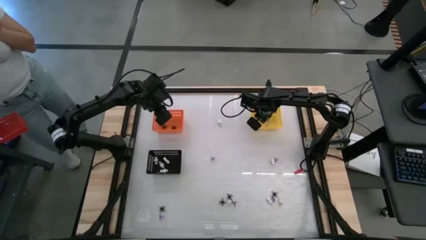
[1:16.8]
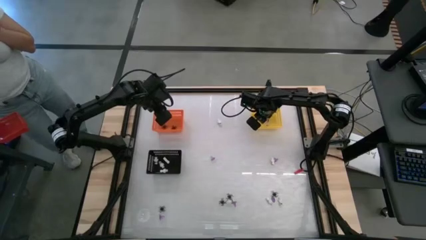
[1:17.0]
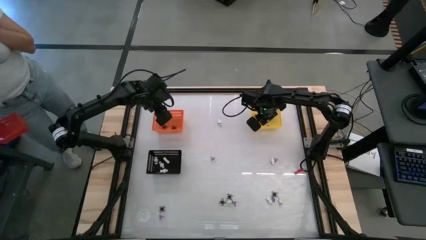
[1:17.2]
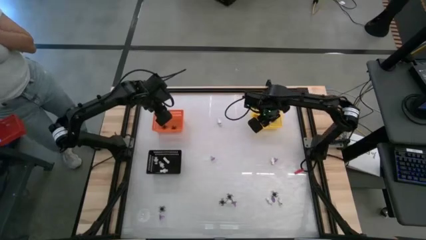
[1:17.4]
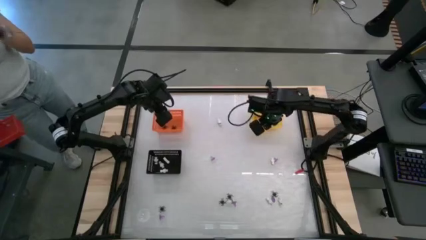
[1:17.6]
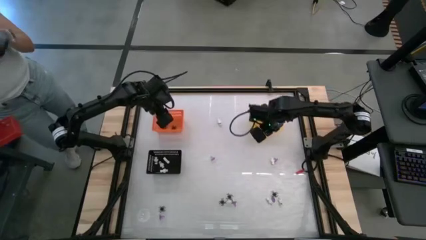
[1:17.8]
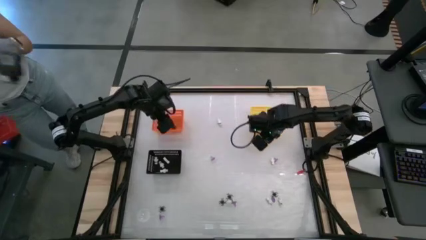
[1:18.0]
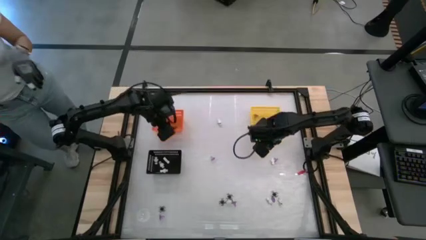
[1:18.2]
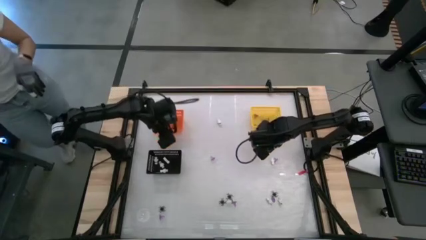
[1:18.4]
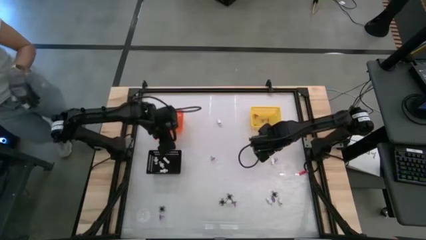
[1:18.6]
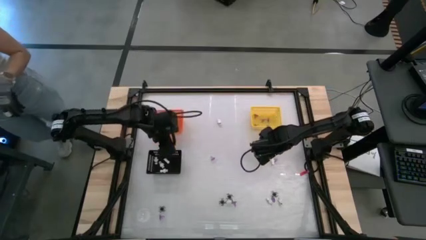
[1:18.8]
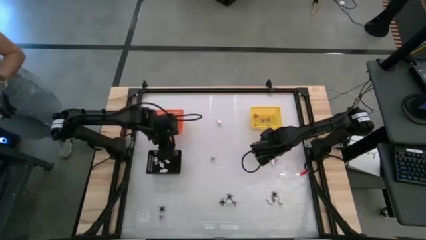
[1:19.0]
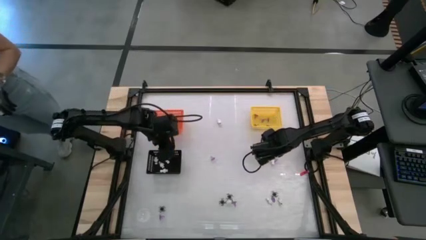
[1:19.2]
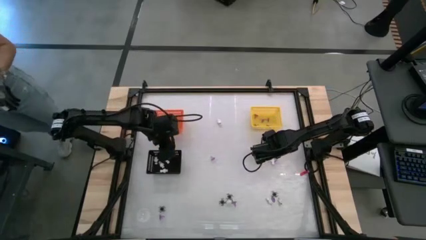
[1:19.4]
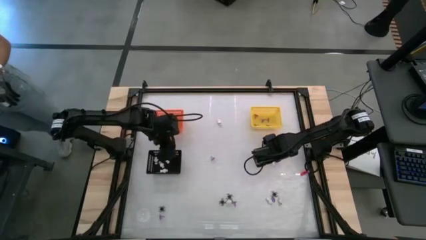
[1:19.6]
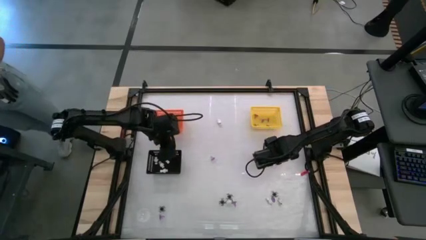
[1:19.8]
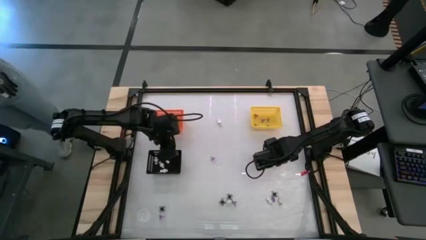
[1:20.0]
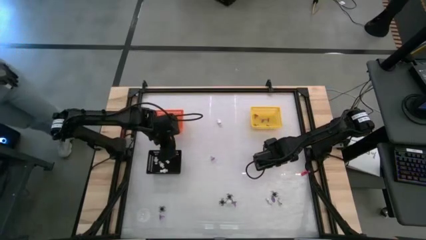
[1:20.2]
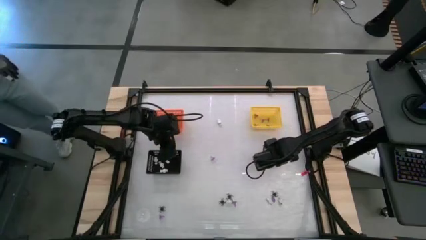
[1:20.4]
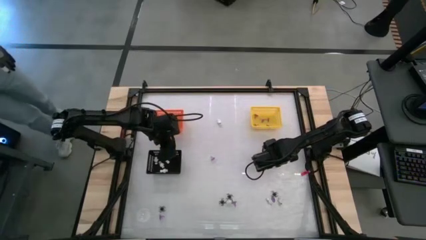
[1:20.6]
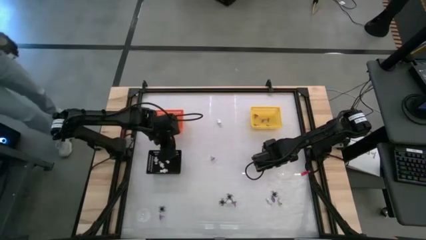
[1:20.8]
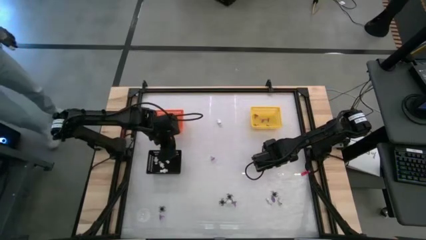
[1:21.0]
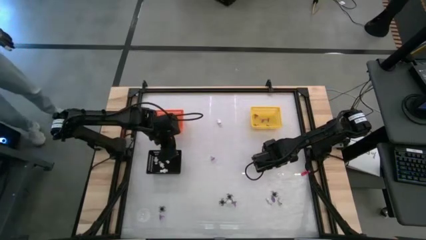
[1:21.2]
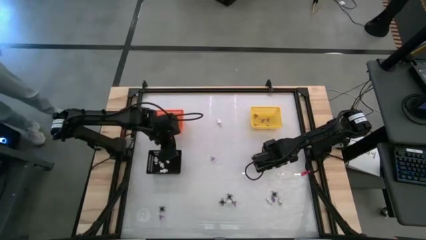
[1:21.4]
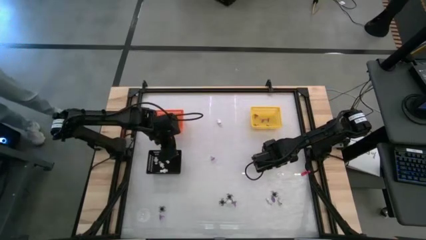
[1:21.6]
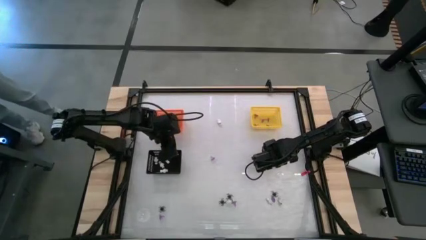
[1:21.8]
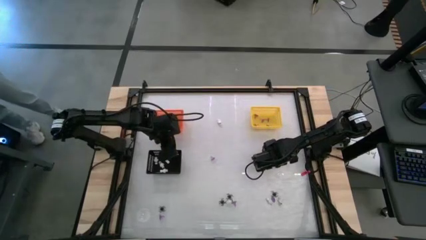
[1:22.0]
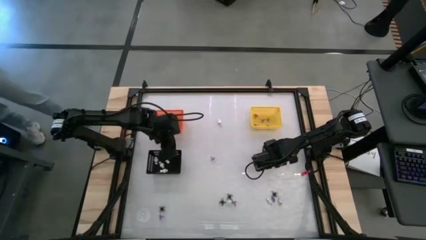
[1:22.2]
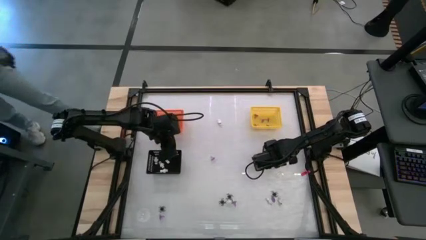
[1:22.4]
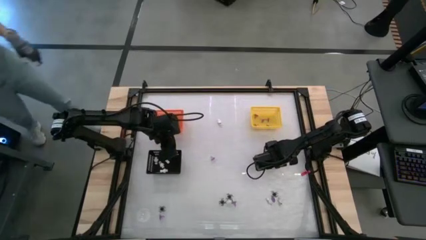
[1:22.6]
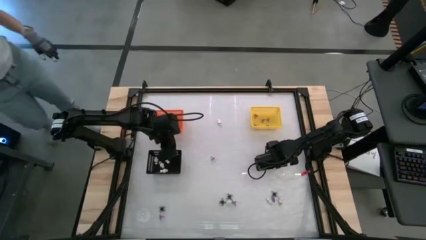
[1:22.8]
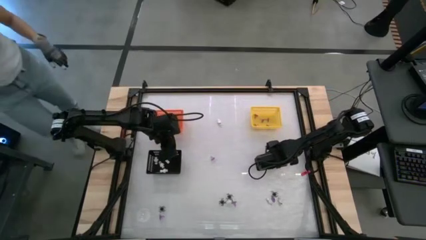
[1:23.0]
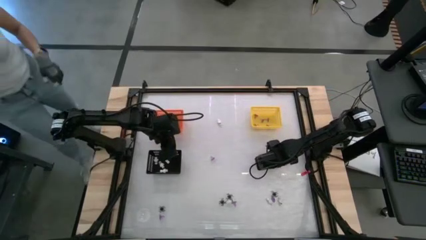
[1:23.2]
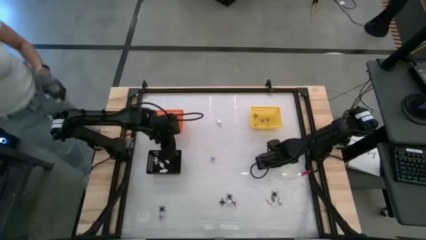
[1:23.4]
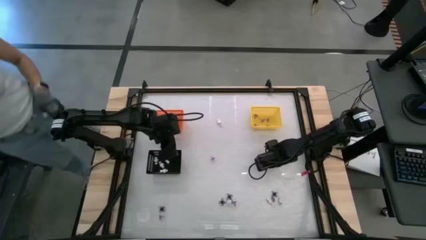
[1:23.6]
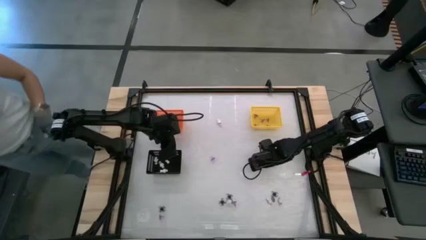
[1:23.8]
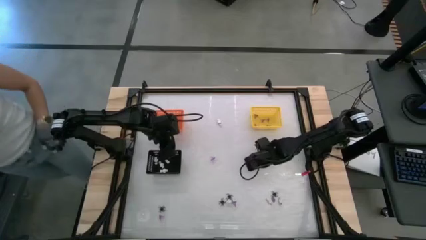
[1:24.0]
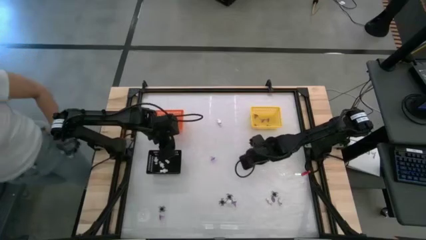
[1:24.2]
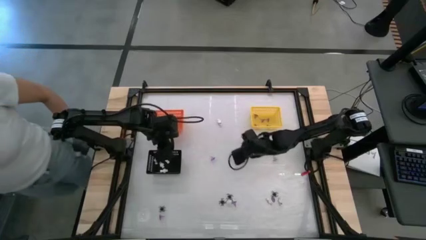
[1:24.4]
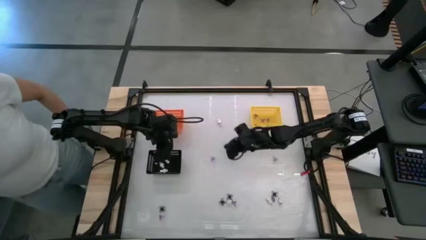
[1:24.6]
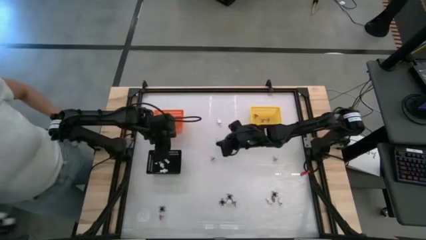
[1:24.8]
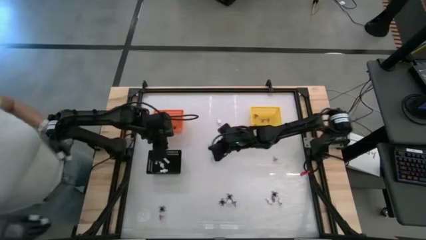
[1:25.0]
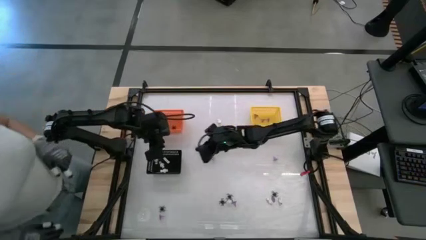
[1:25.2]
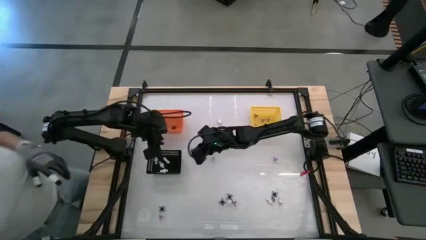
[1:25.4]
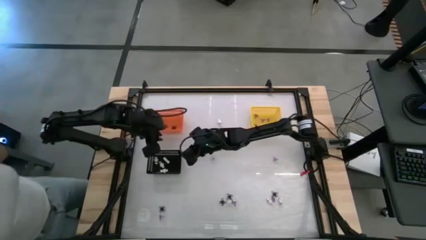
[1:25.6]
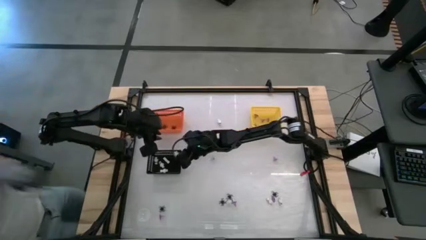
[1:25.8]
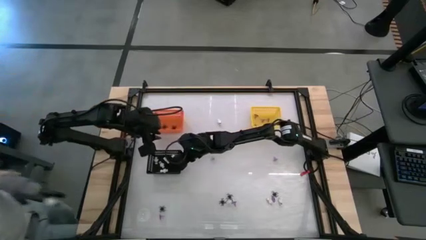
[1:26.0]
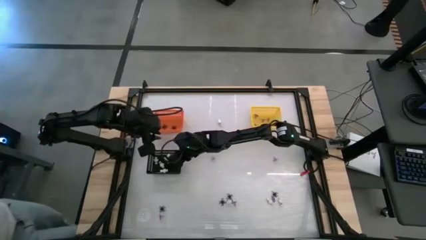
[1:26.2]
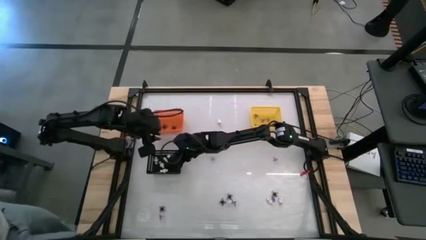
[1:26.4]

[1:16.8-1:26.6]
Task: Sort Halloween decoration
Put the white skeleton toy into the black bin

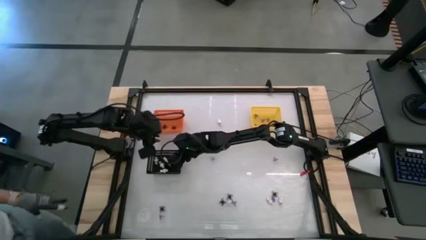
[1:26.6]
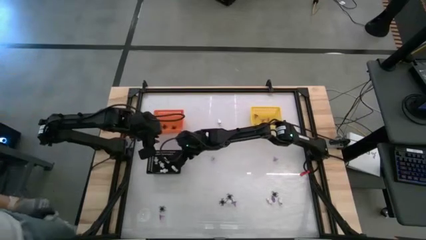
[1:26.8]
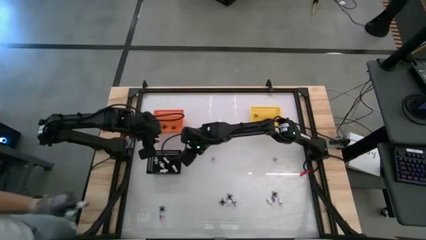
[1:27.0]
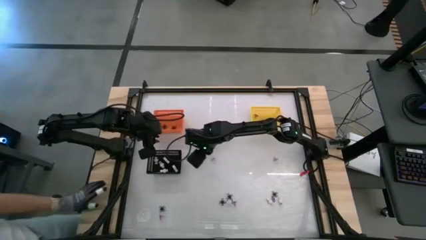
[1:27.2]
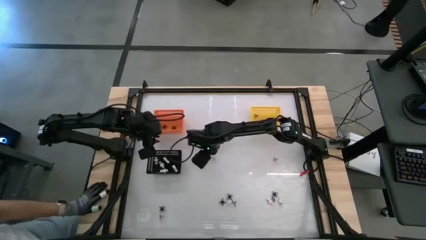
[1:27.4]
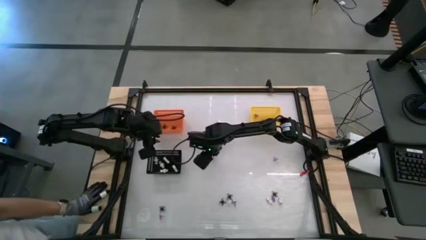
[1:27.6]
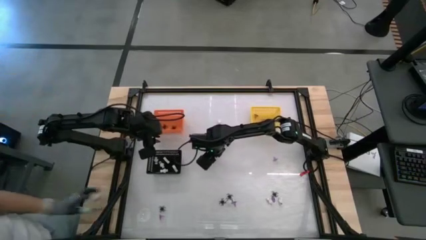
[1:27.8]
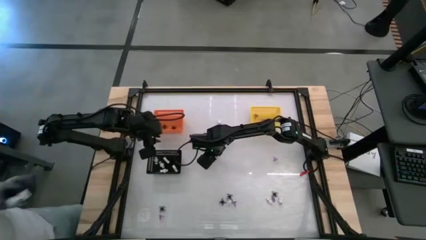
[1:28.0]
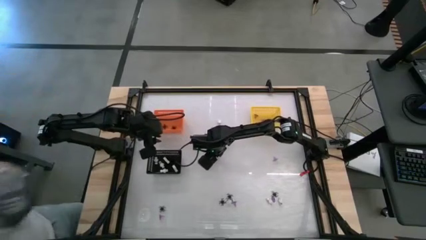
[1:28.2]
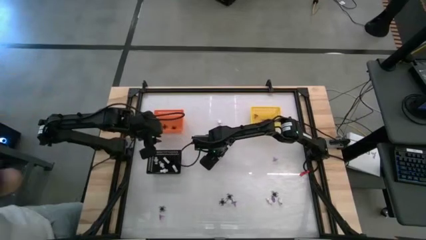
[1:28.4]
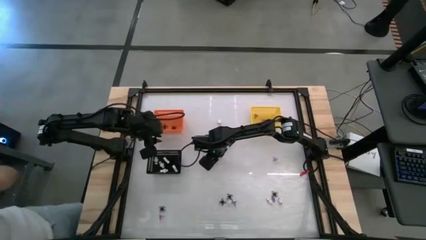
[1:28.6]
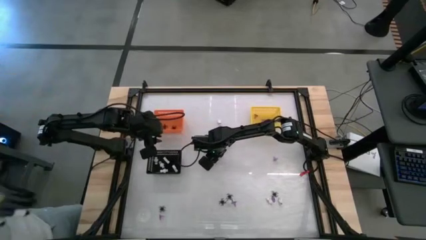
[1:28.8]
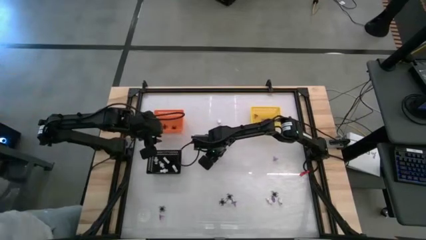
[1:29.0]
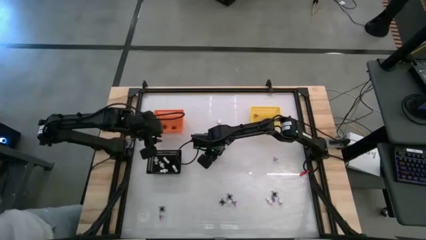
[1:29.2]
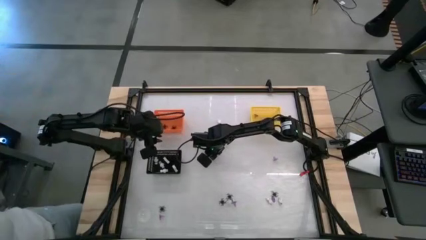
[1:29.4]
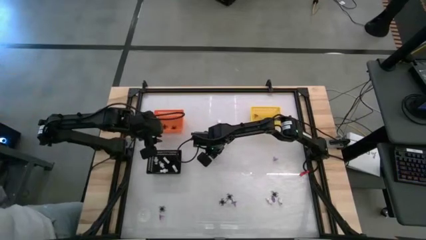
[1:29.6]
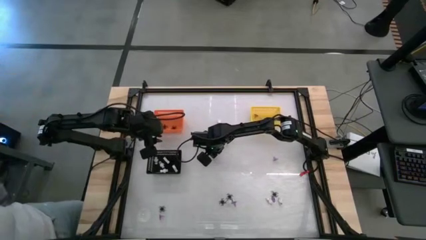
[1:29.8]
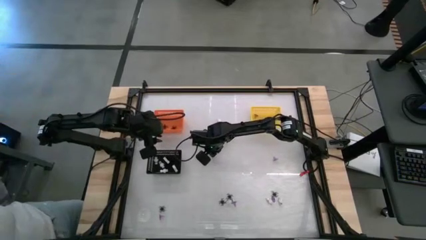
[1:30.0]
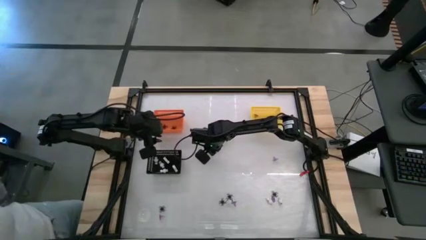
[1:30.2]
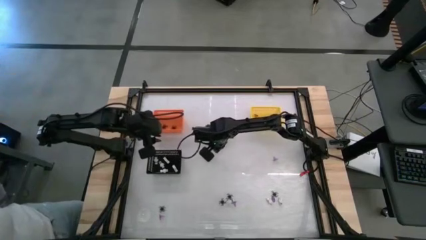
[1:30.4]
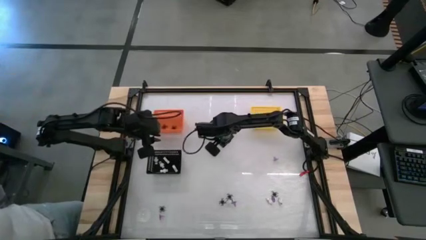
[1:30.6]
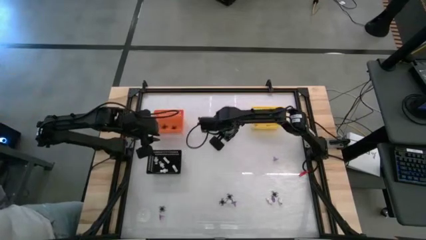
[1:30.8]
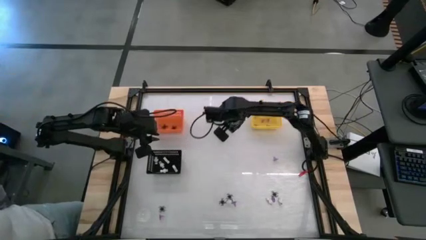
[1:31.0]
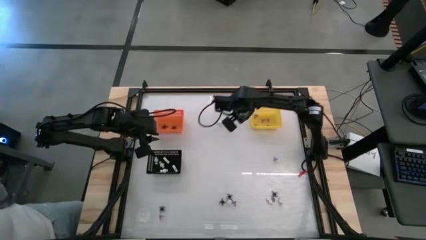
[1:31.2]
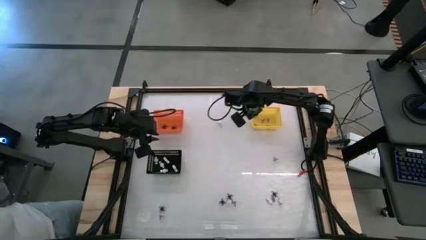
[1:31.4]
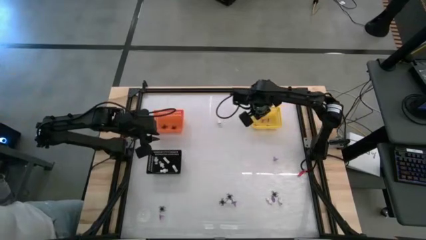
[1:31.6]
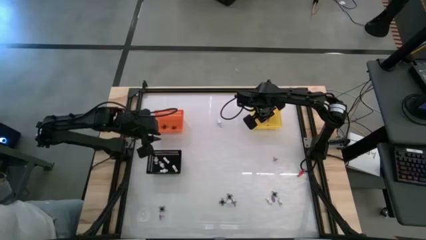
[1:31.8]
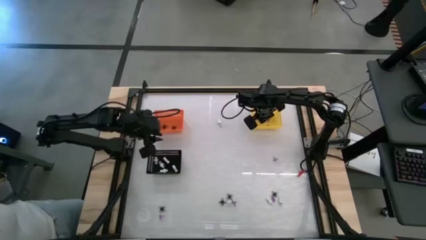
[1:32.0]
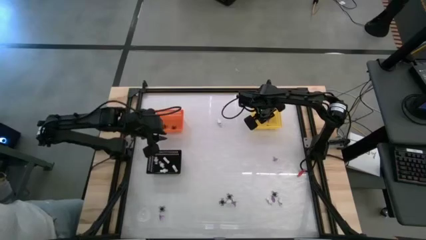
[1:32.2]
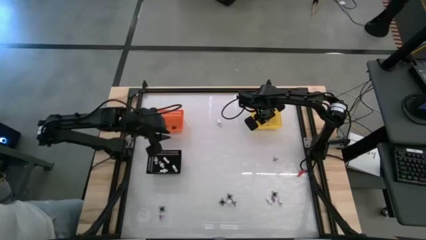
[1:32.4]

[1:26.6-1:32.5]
Put the violet witch hat into the yellow bin

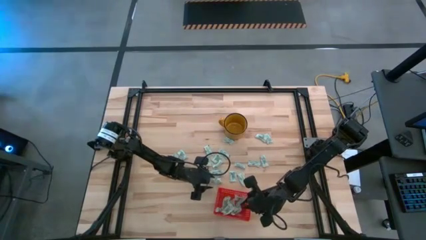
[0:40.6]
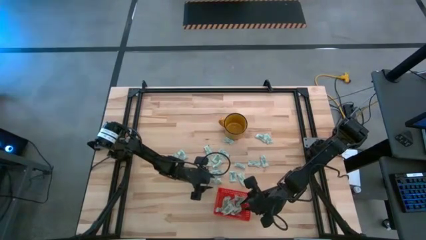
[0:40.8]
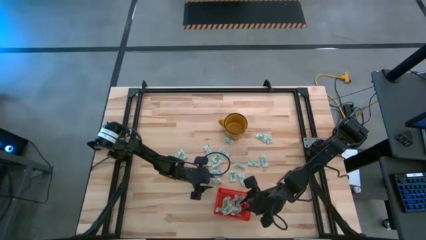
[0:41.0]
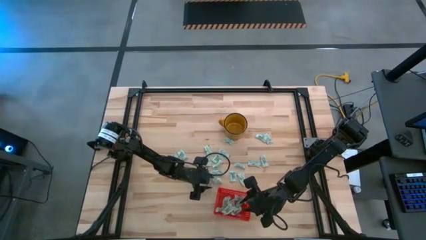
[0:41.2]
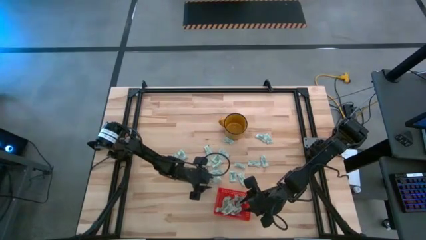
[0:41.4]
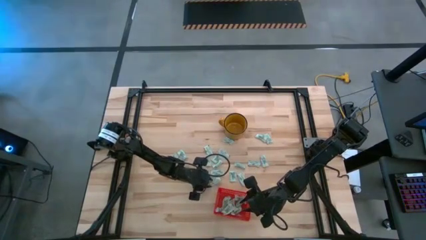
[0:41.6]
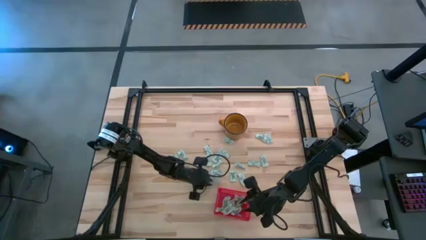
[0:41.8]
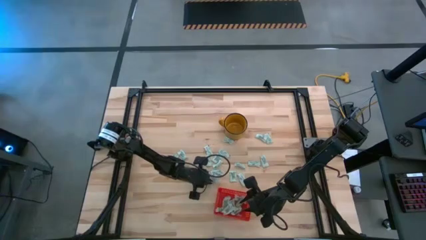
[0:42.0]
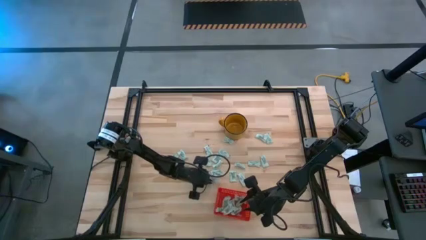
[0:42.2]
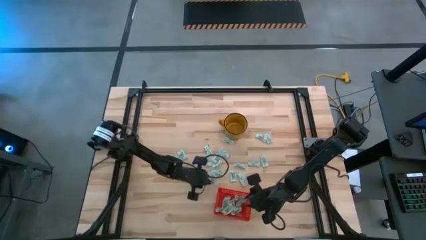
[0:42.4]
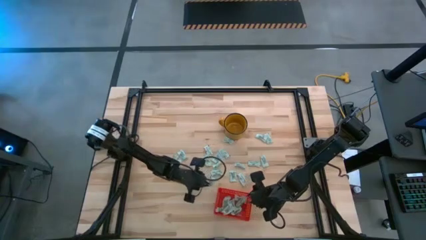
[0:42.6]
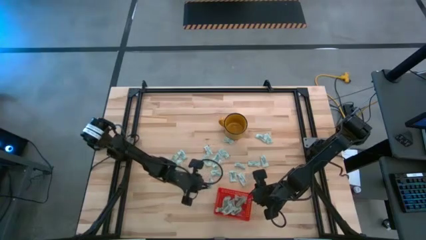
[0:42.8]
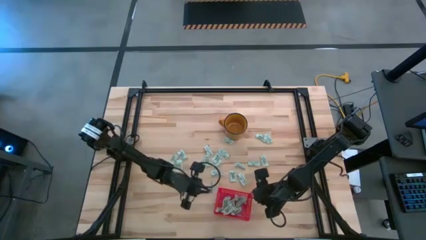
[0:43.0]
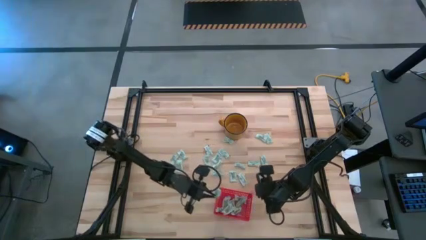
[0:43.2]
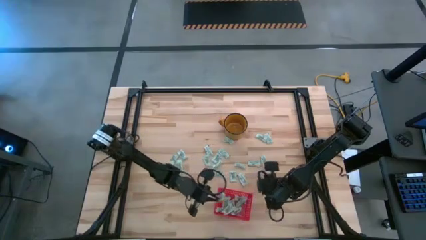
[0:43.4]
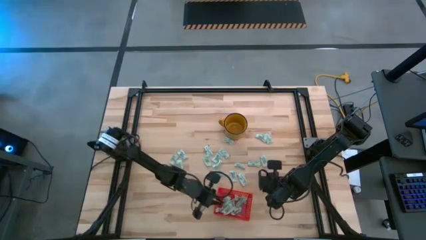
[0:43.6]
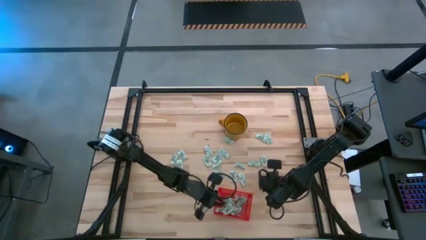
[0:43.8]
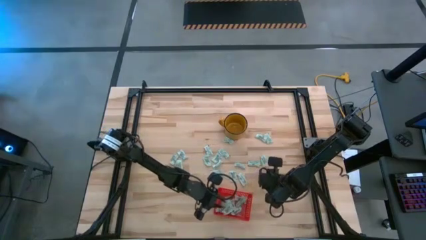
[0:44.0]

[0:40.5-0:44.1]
Task: Pick and place Stevia / Truvia into bins
Put the stevia packet into the bin
